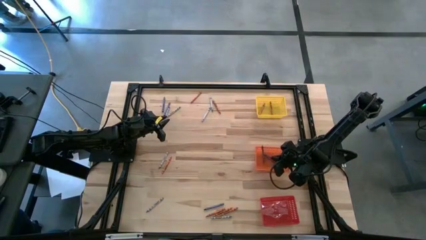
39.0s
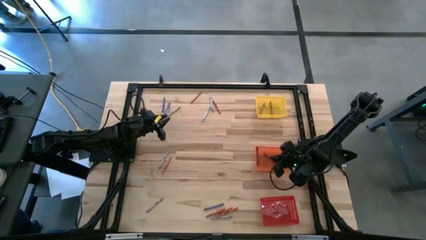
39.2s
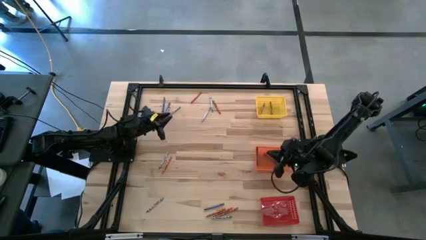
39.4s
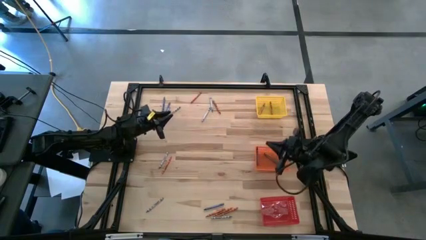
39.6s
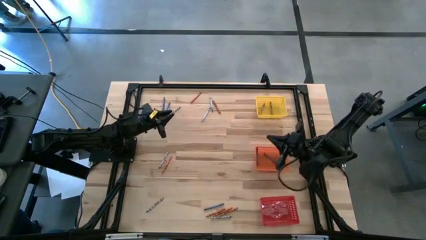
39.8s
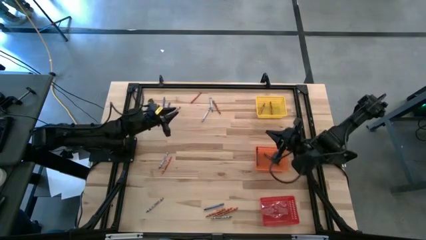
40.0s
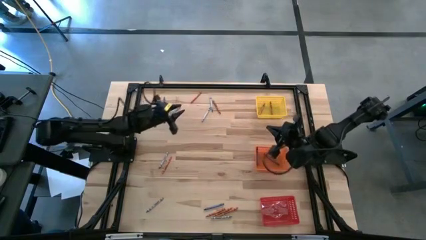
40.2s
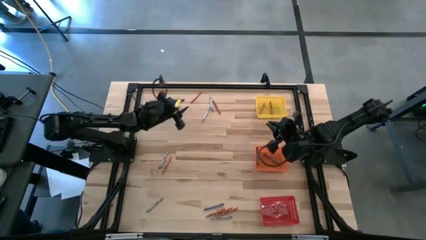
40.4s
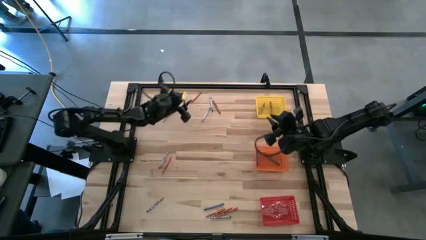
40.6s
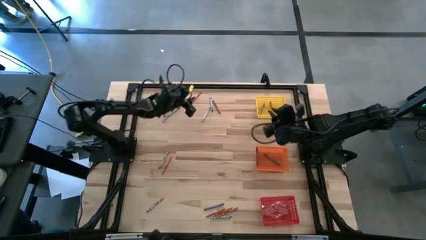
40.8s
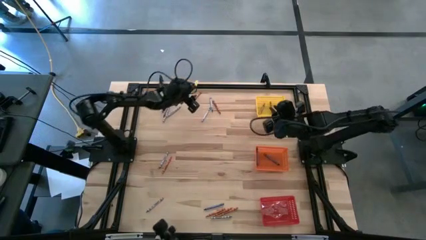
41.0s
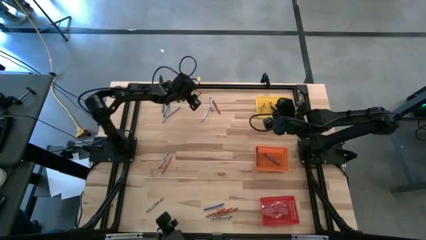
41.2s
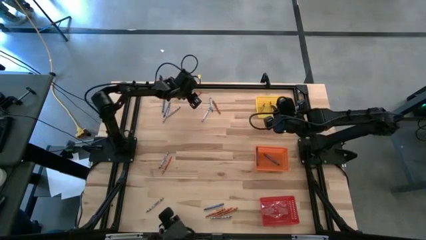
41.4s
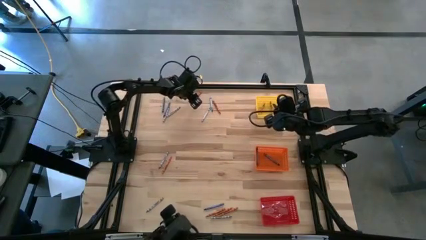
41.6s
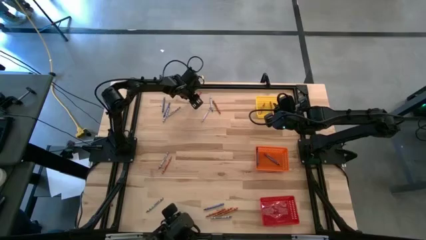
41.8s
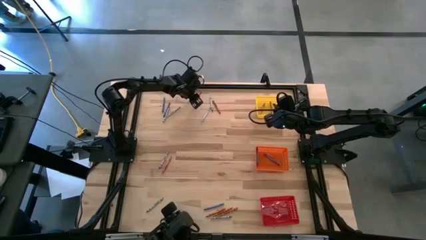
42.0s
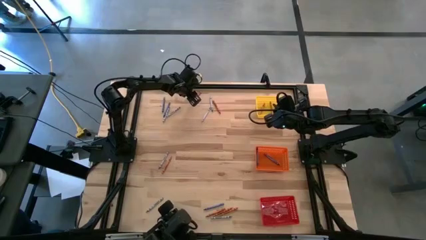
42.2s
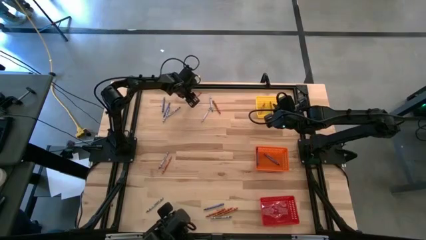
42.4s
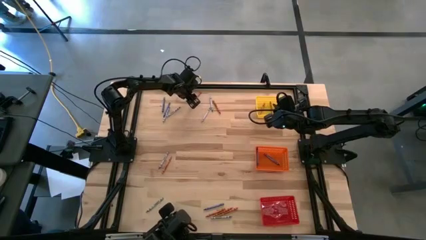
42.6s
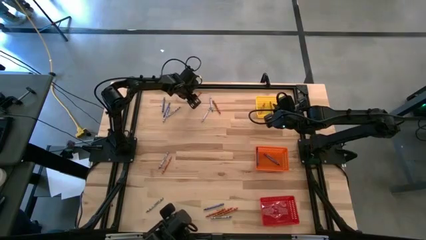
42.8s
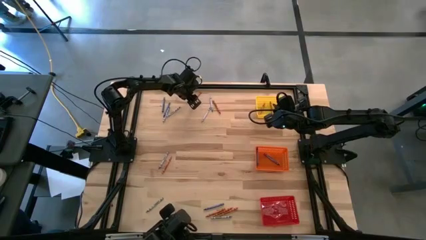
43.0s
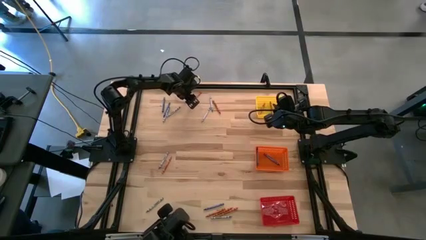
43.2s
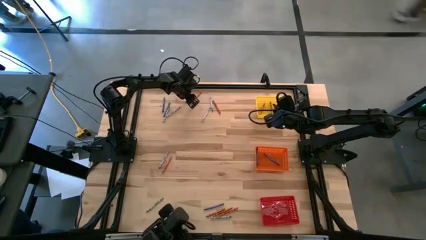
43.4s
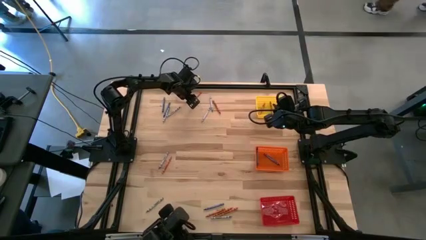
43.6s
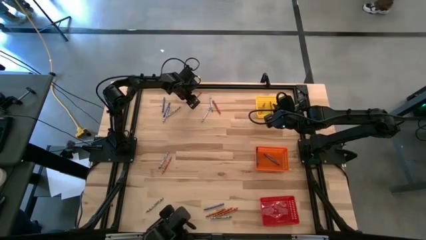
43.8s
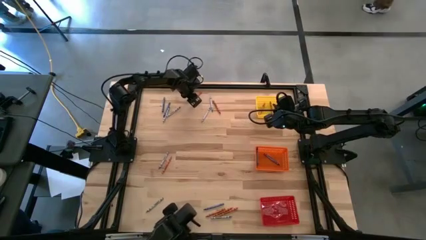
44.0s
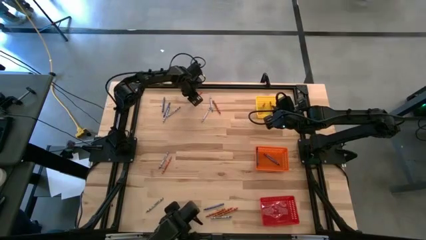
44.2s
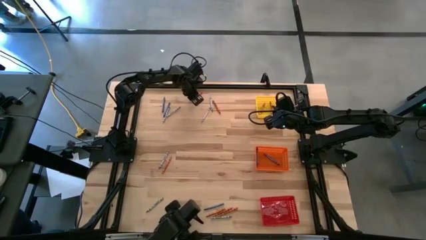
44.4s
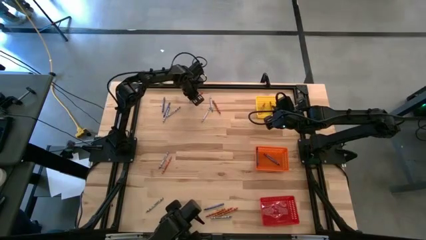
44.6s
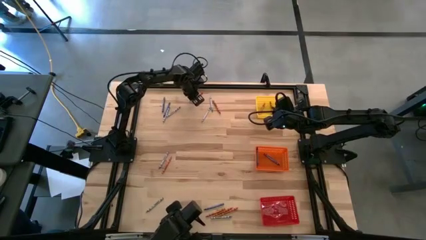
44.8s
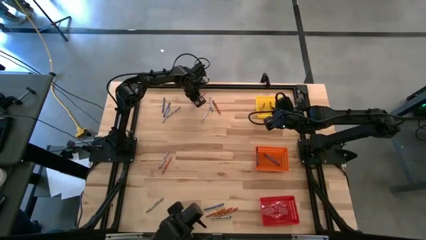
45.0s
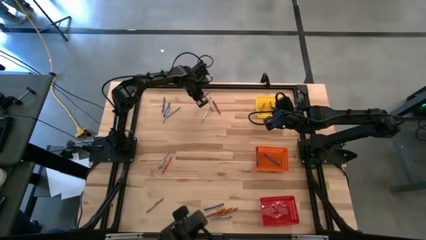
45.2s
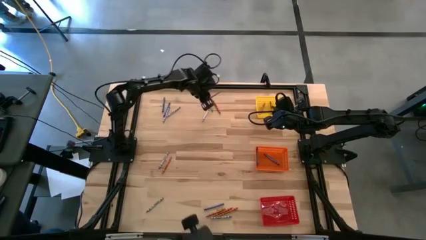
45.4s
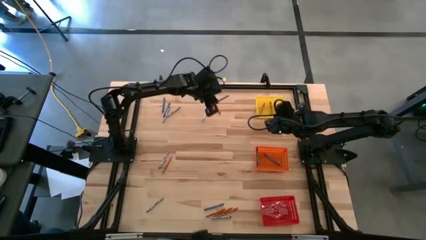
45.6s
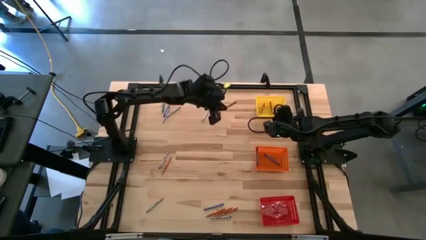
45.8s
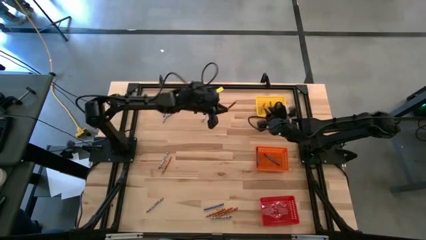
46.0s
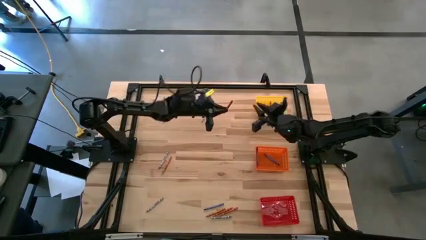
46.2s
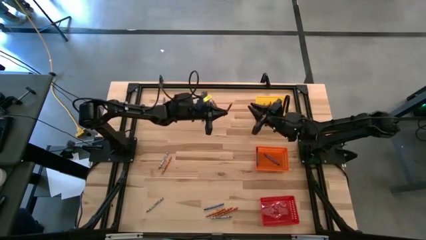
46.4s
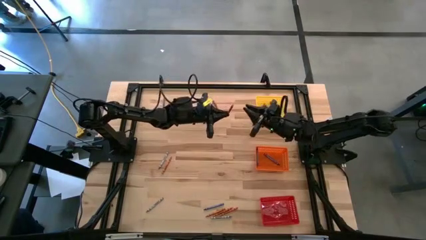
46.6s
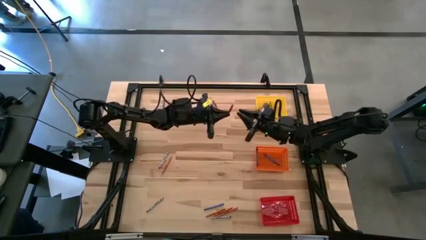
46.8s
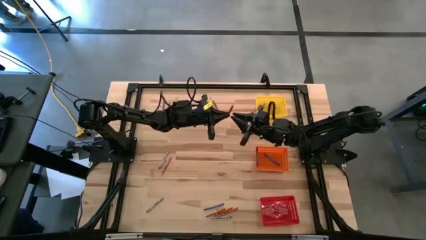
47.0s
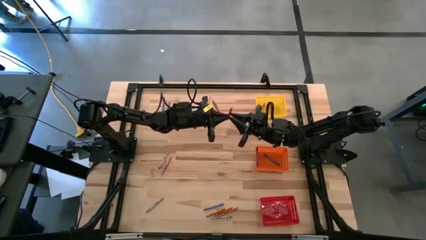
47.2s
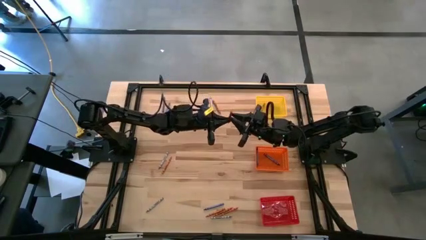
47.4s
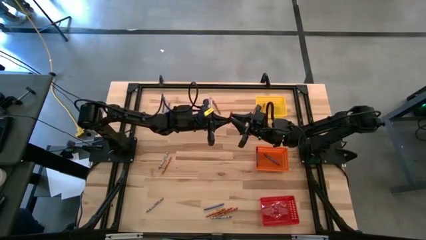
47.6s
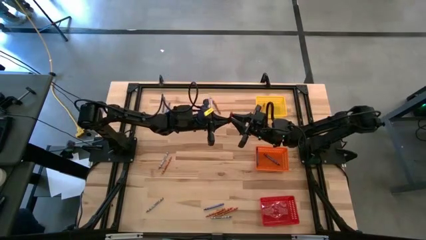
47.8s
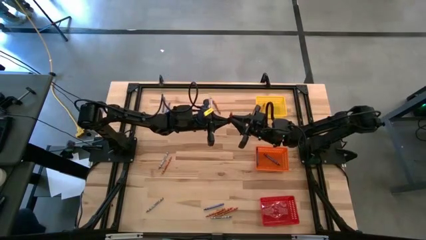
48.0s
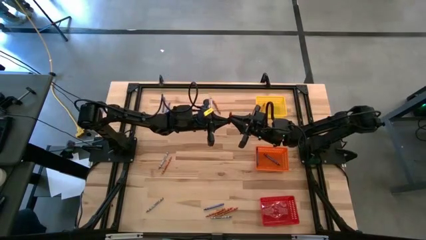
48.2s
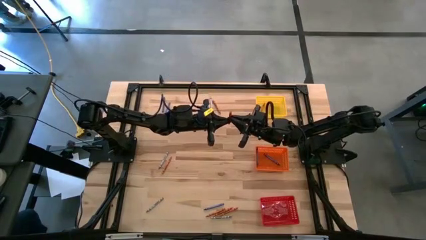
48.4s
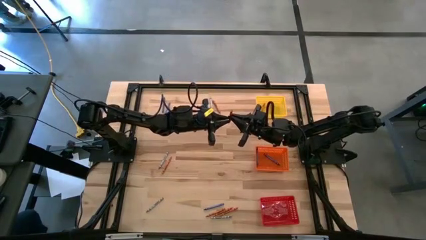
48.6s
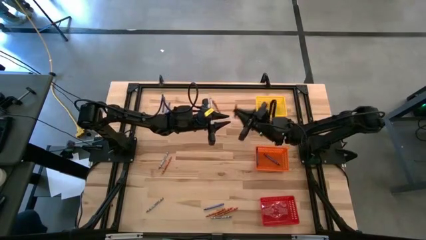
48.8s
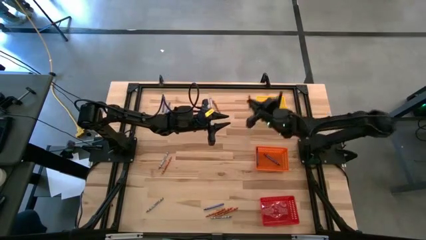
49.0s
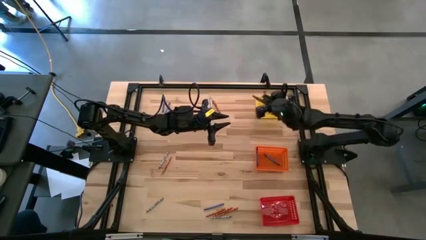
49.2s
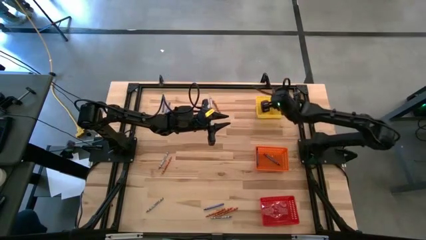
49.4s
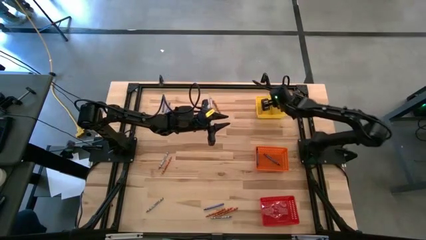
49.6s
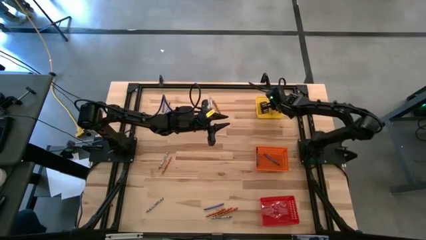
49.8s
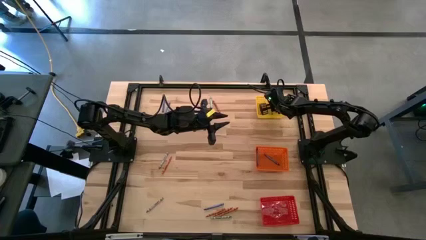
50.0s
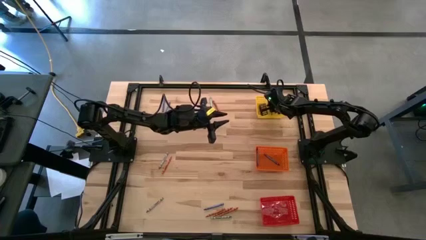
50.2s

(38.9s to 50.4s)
Task: Sort crayons
Put the orange crayon into the yellow bin

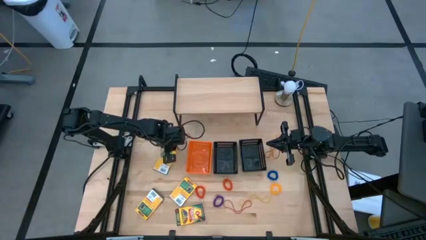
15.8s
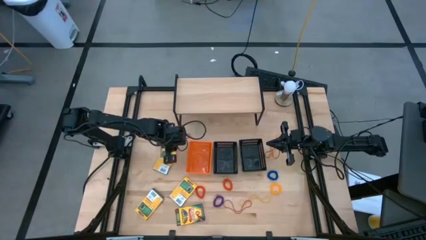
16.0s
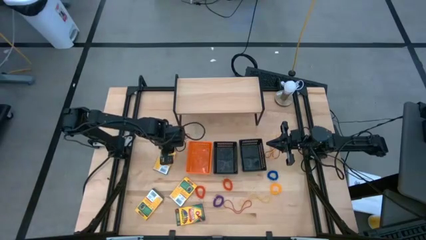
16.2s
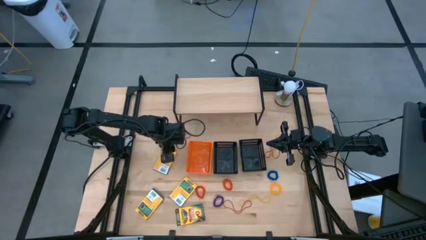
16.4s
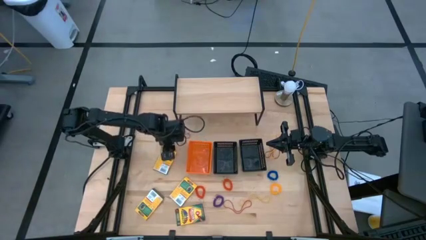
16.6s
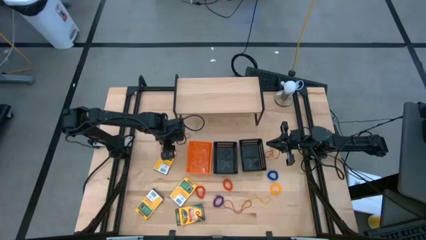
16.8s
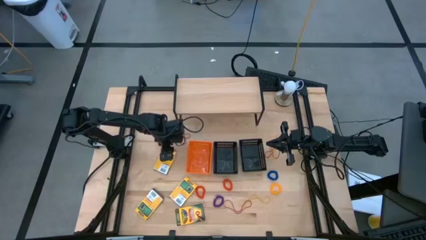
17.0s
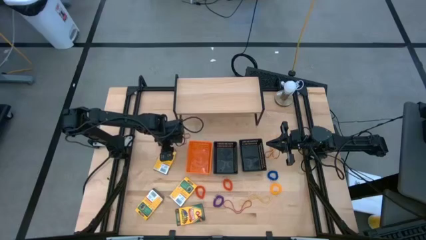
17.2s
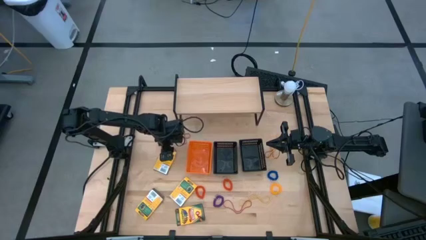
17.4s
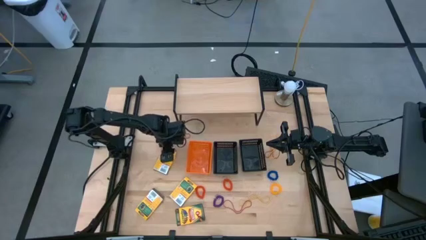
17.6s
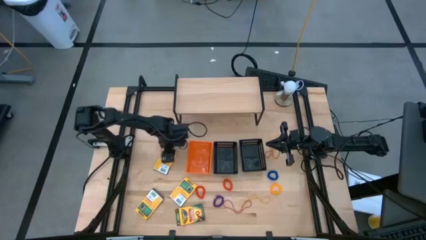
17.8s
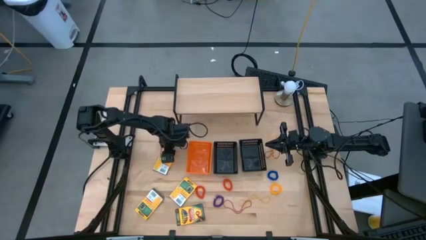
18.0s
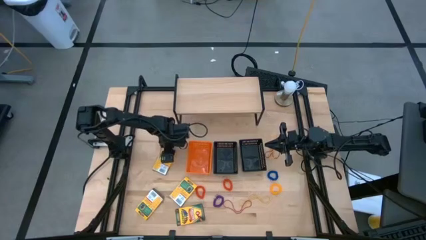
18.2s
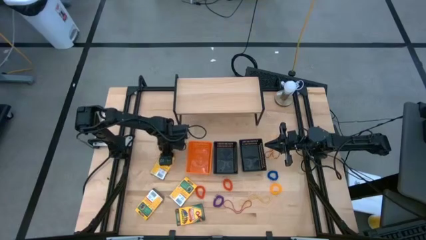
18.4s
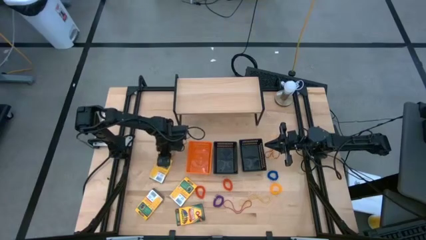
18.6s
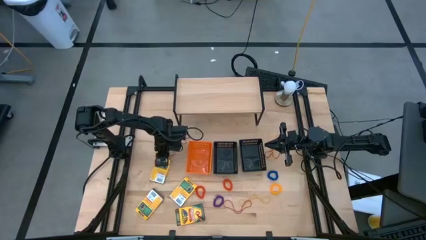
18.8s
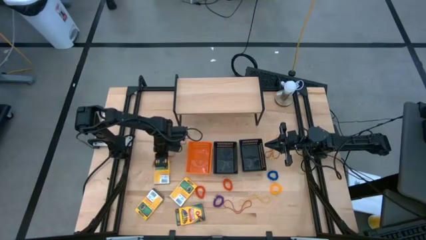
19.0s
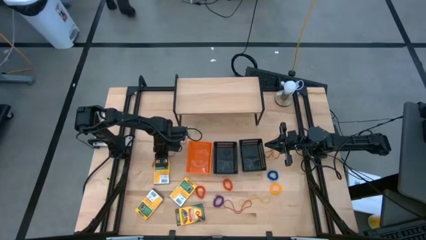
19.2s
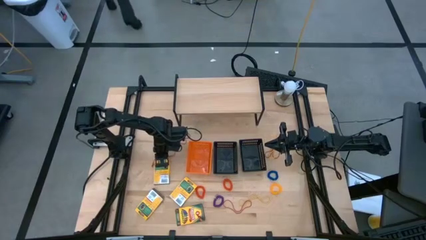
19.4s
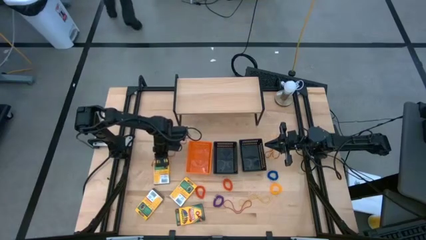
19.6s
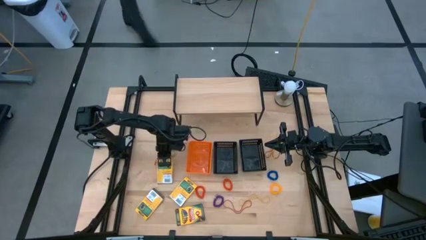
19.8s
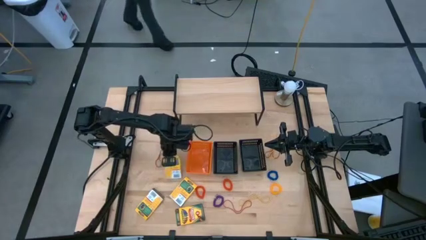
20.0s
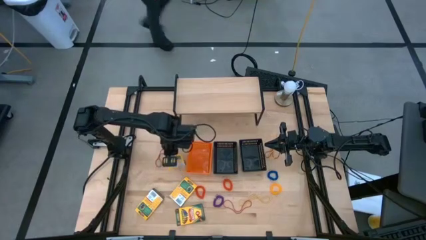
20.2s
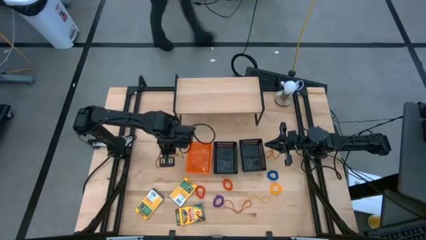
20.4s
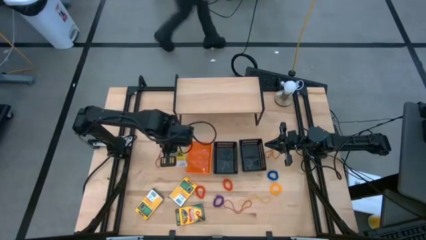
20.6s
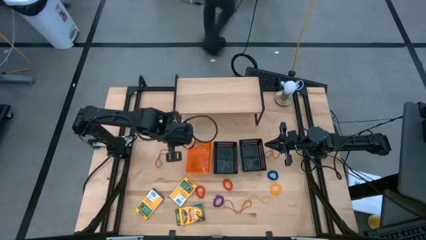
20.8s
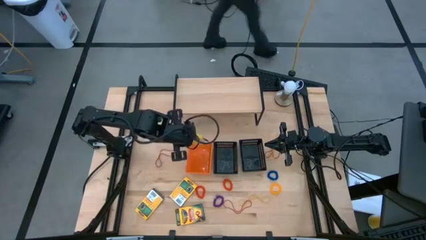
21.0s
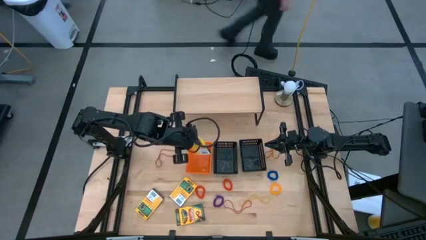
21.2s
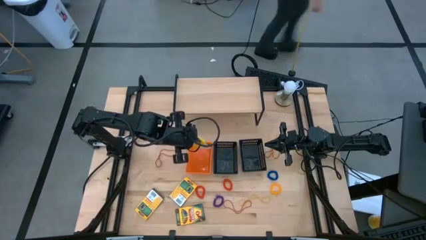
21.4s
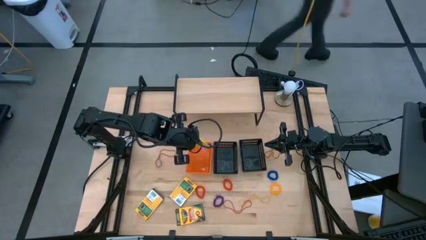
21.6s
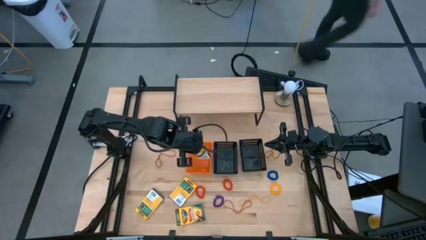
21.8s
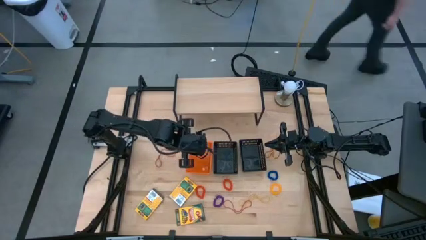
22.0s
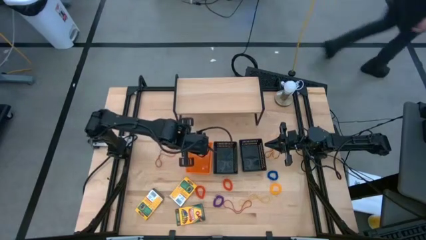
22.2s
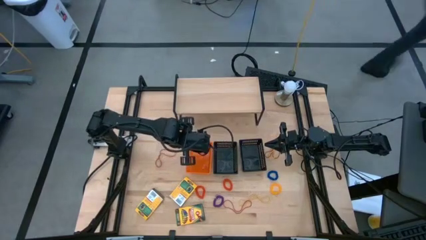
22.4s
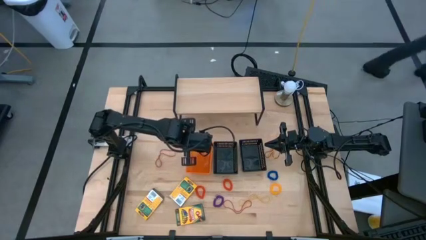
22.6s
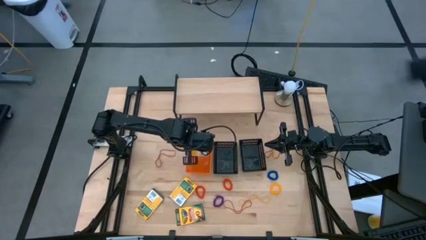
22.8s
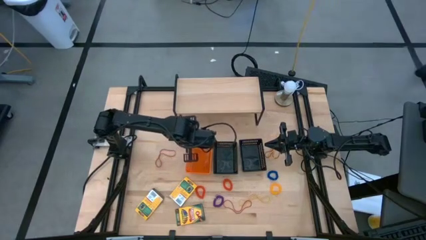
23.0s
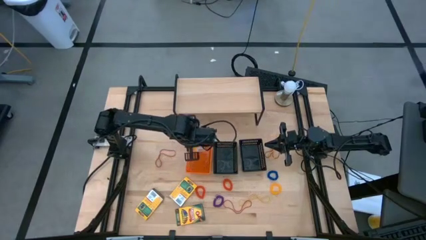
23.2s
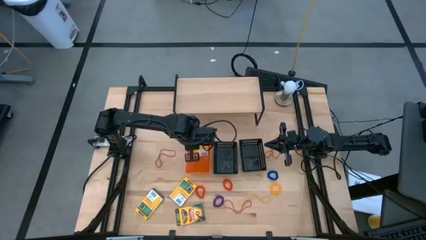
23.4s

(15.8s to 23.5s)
Task: Pick & Place Office Desk Supplies
Put the yellow crayon box into the orange bin
